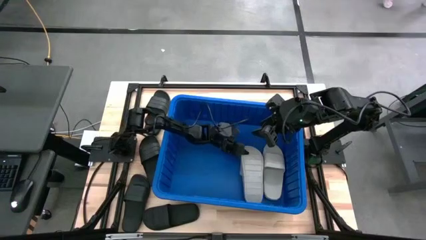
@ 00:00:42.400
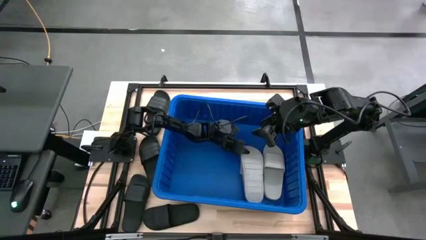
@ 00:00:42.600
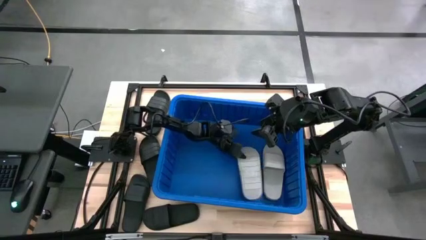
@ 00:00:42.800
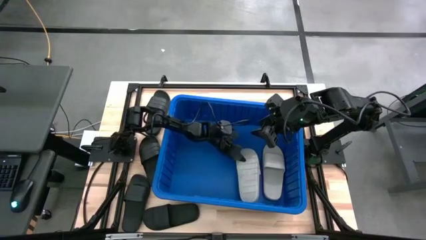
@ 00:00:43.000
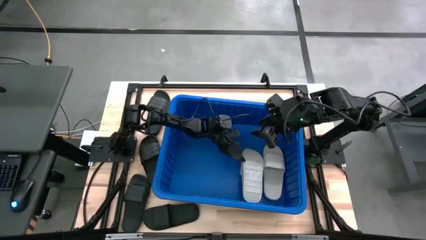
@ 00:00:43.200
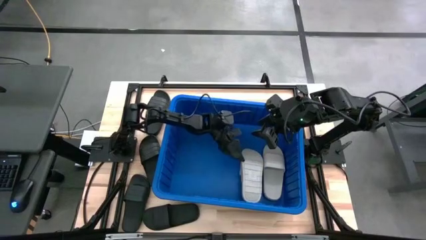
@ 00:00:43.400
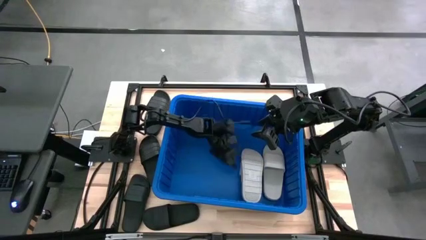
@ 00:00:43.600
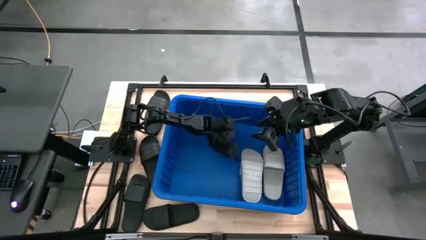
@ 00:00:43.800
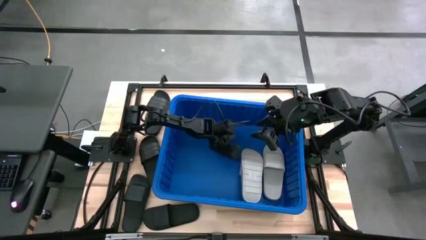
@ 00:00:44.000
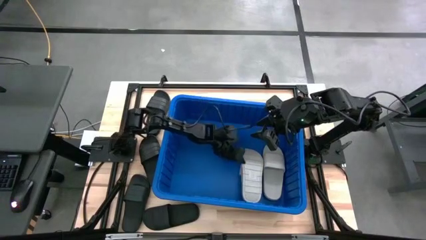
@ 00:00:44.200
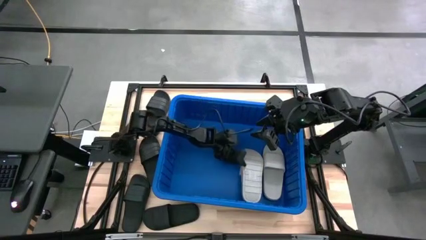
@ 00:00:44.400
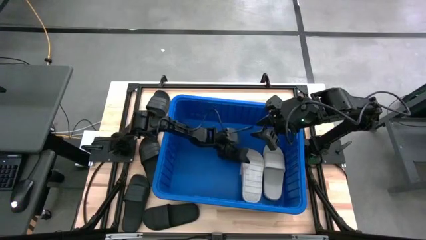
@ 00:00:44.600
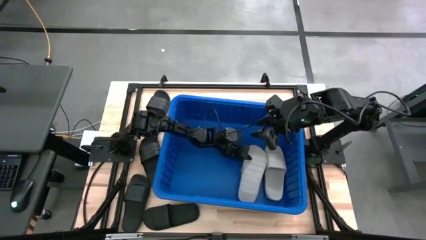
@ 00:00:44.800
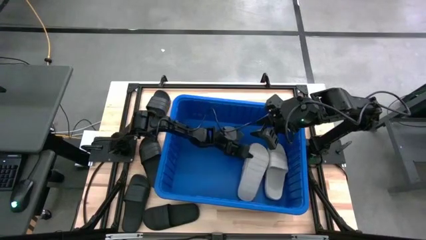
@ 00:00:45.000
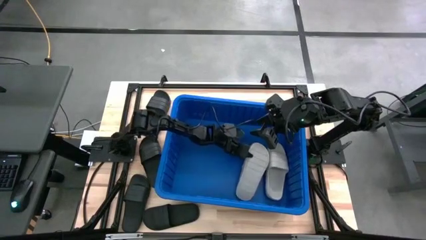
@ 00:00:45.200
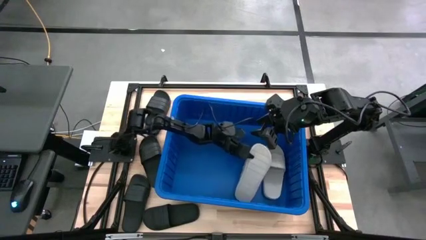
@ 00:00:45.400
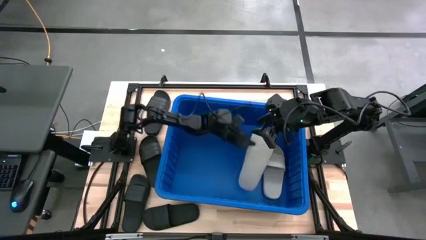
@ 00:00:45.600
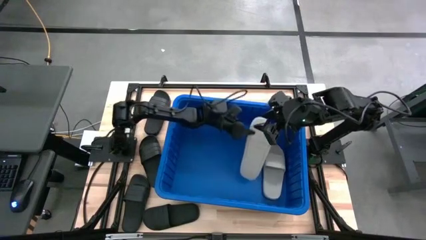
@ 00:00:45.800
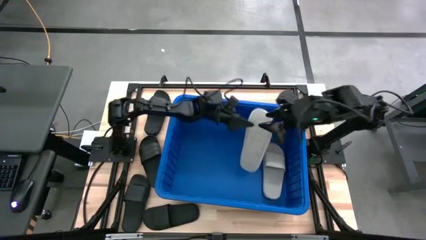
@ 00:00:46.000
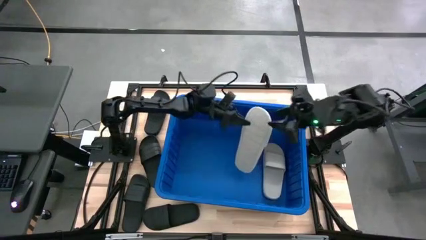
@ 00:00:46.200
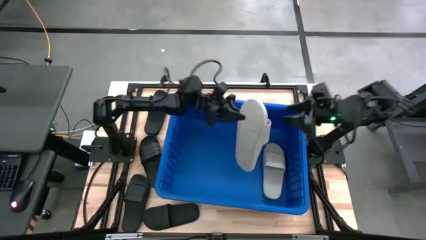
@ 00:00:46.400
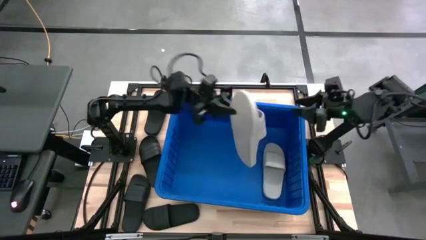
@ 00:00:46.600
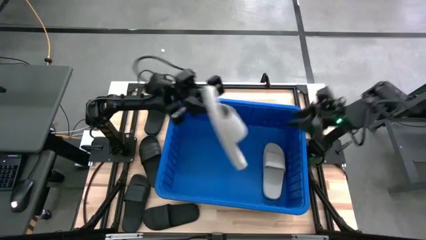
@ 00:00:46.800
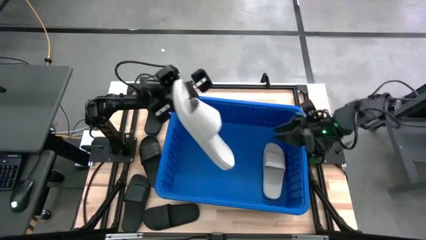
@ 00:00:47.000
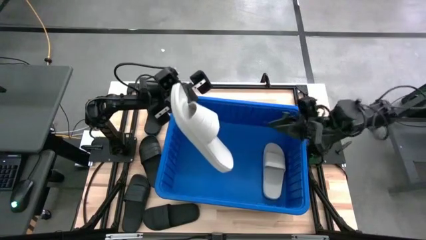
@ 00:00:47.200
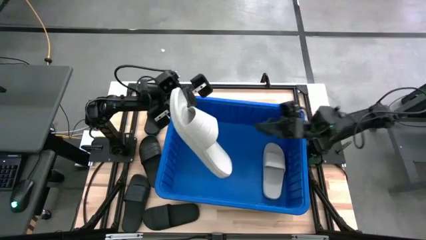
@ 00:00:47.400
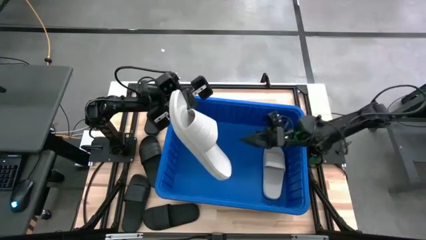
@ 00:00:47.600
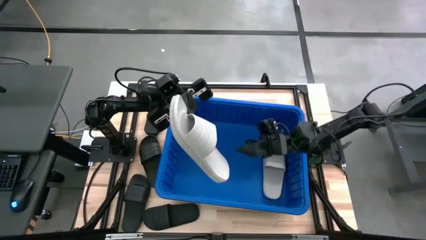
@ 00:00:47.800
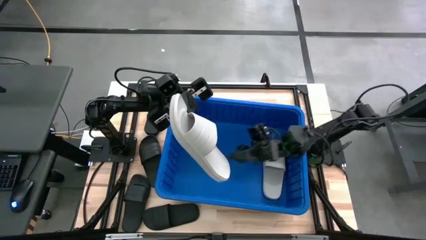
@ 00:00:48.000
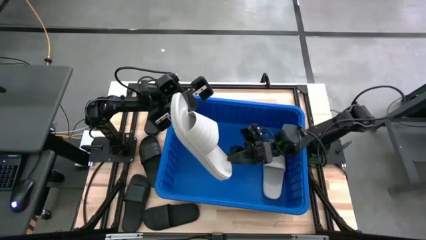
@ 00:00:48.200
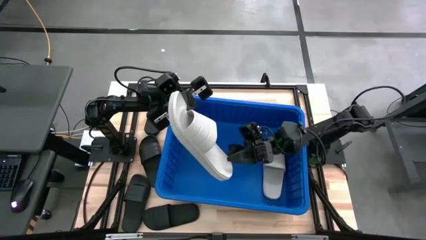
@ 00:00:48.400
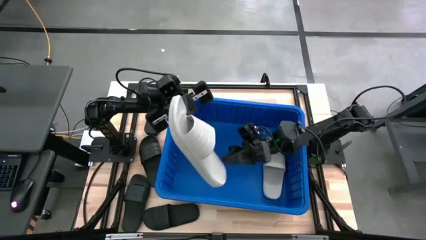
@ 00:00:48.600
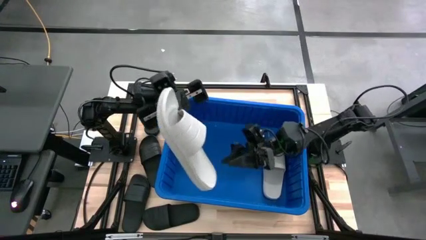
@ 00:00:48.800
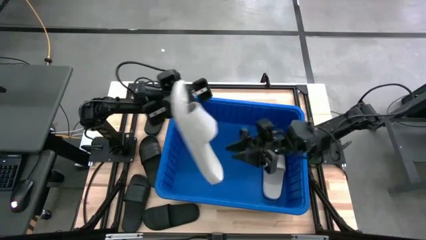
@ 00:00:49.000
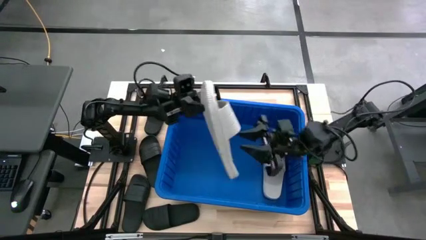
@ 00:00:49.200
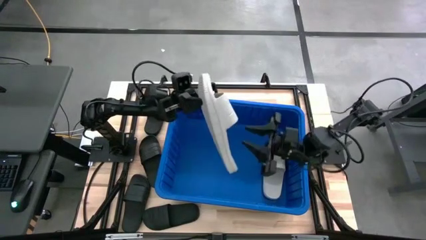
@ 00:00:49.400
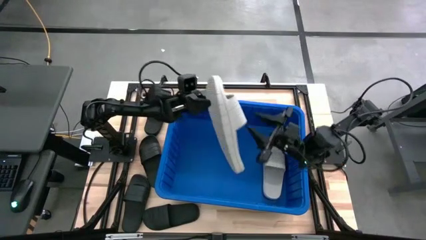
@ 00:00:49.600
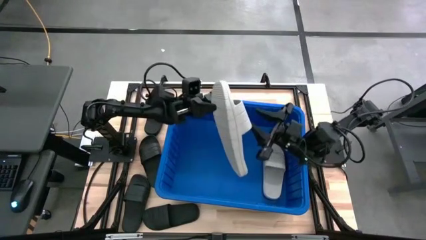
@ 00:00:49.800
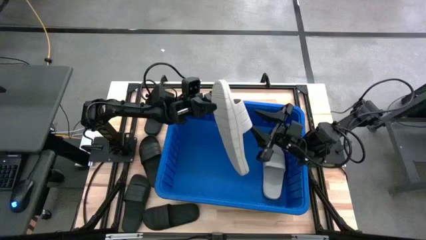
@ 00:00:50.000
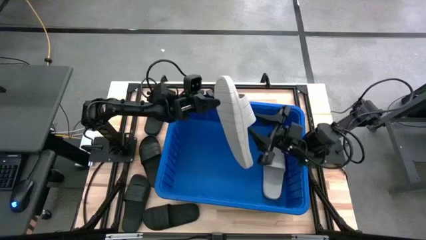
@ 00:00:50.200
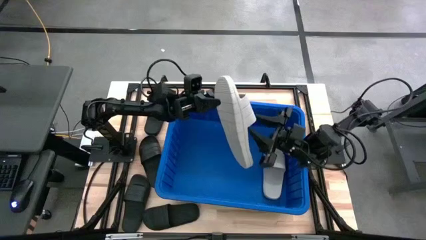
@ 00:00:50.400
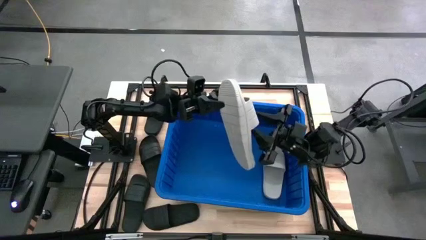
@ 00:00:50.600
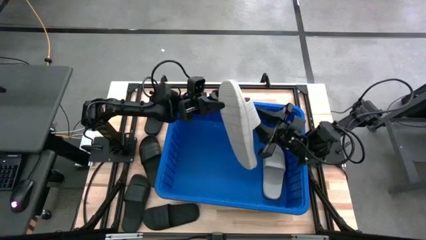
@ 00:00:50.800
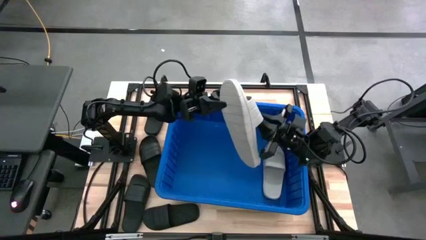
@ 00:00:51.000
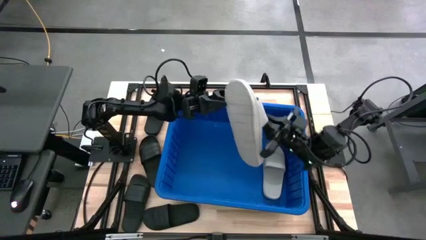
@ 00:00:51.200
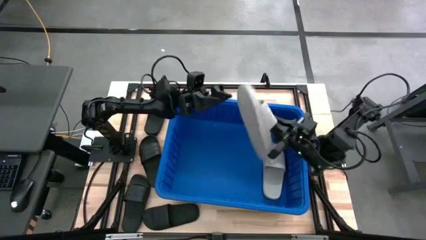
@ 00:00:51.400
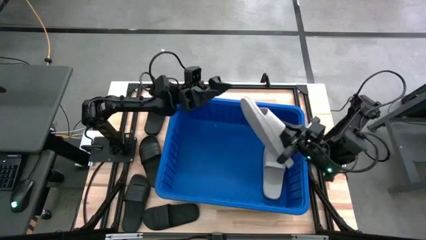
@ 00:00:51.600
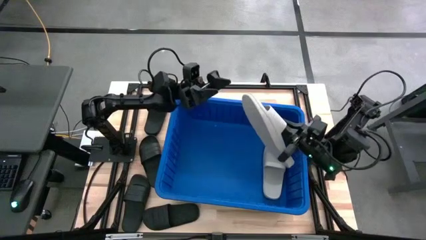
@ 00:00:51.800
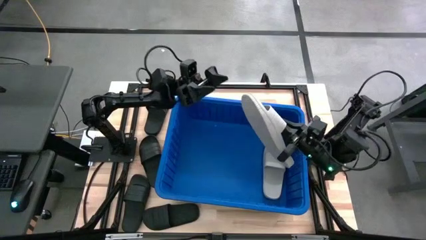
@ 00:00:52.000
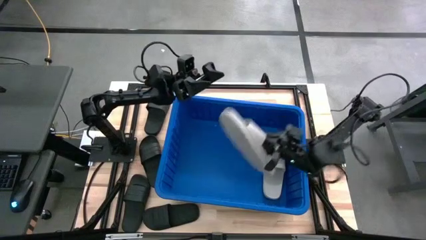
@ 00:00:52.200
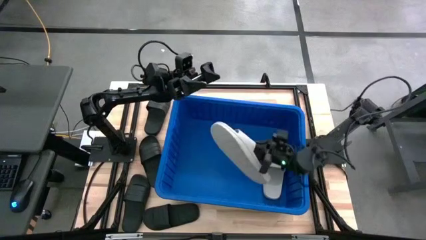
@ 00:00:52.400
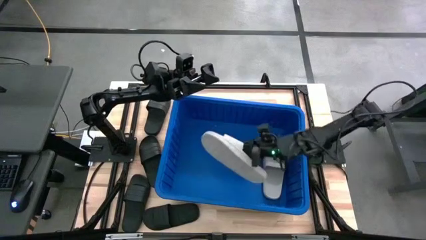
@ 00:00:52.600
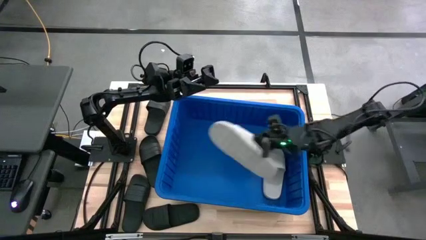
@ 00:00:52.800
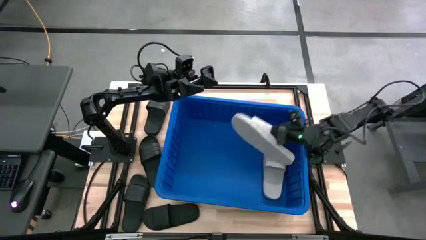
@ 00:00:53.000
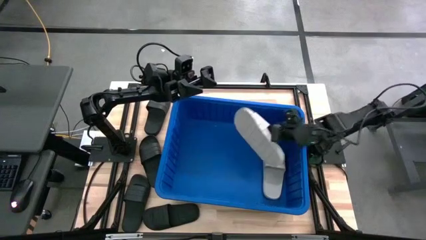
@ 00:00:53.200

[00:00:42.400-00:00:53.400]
Task: Pick and place slides into bin
Put the gray slide into the blue organizer bin
